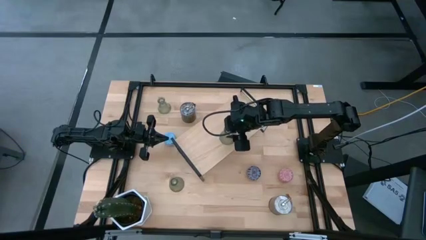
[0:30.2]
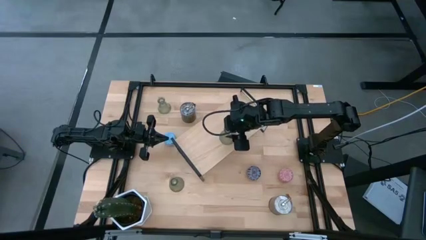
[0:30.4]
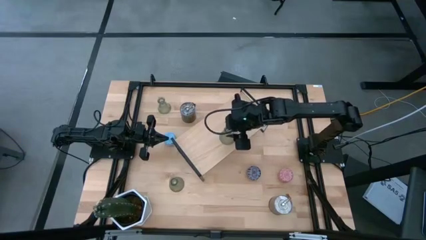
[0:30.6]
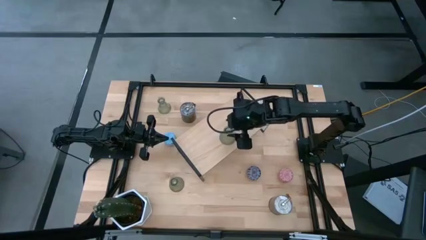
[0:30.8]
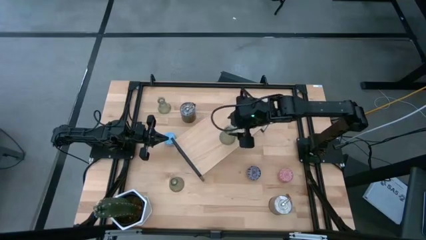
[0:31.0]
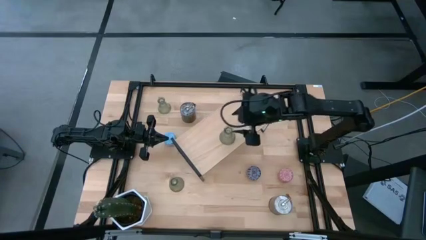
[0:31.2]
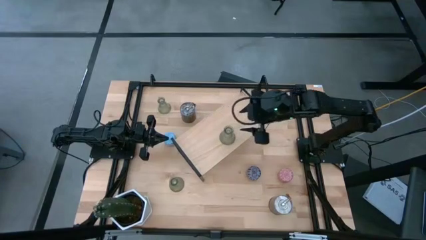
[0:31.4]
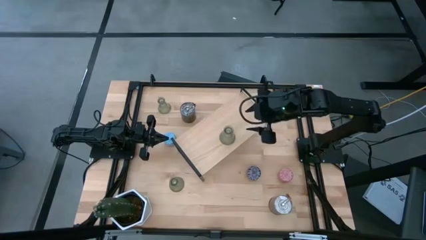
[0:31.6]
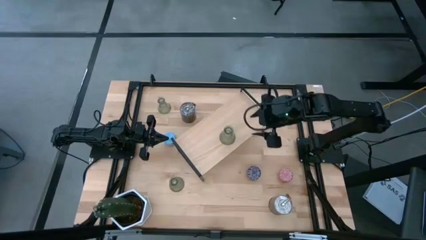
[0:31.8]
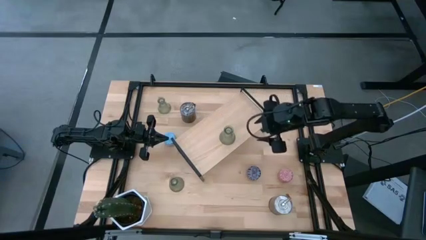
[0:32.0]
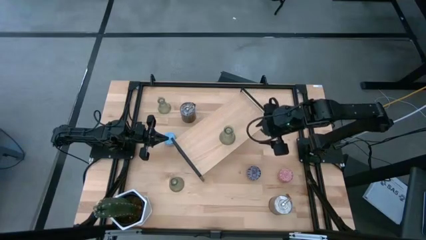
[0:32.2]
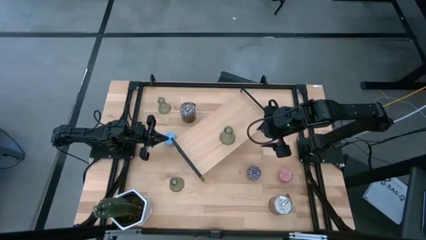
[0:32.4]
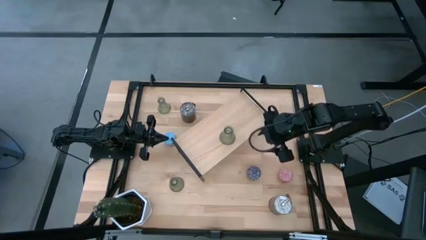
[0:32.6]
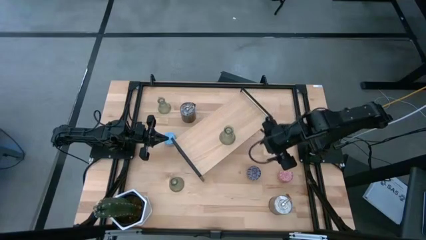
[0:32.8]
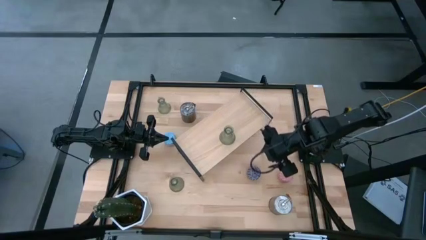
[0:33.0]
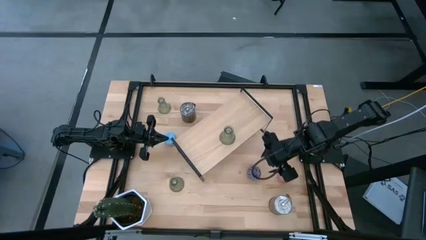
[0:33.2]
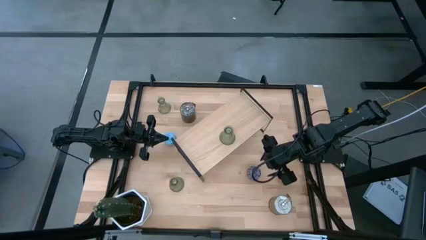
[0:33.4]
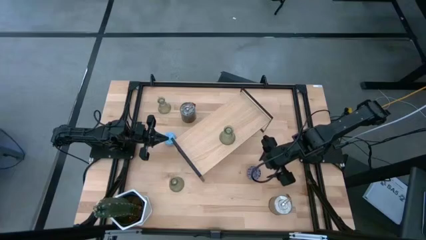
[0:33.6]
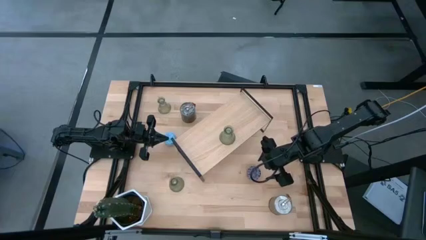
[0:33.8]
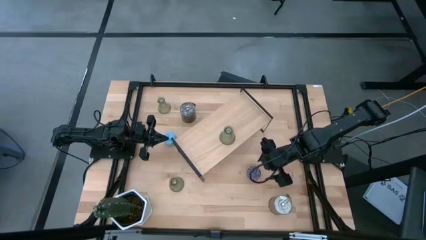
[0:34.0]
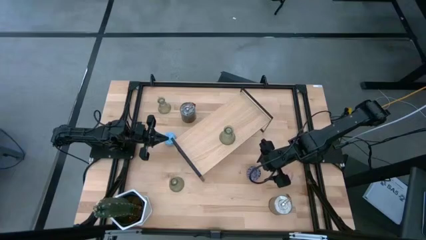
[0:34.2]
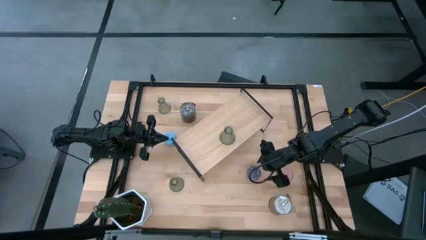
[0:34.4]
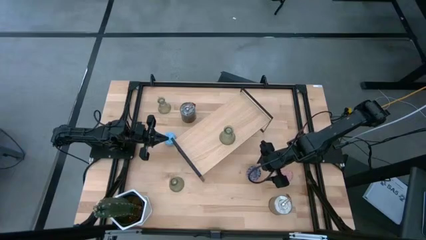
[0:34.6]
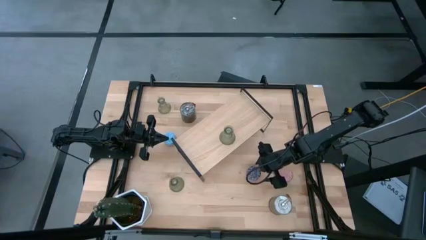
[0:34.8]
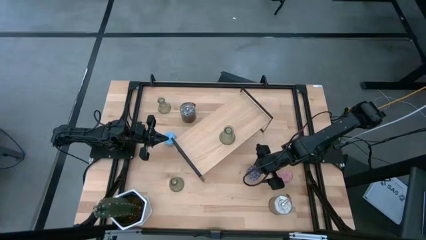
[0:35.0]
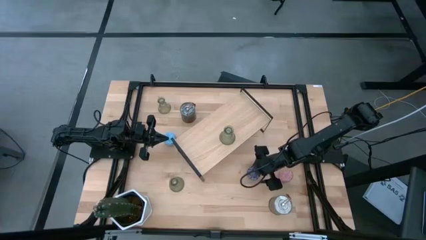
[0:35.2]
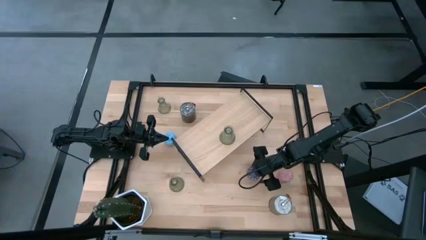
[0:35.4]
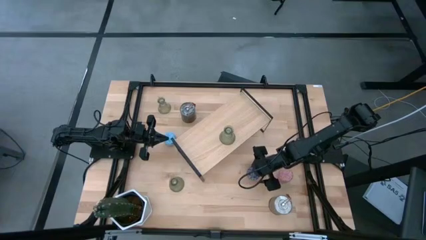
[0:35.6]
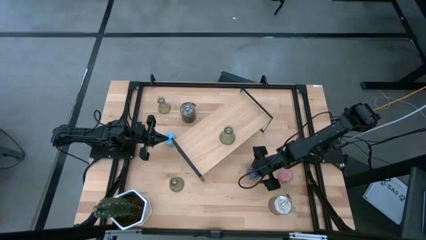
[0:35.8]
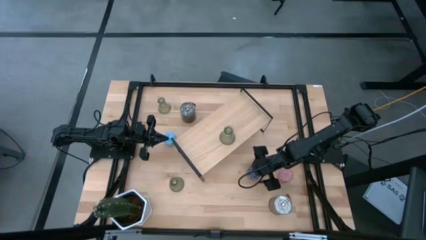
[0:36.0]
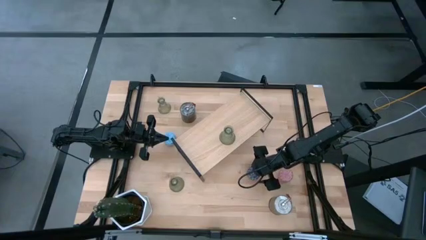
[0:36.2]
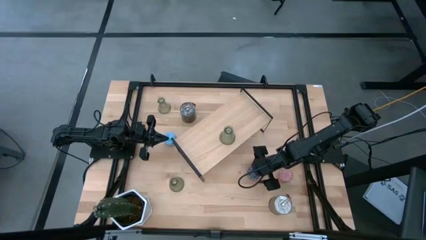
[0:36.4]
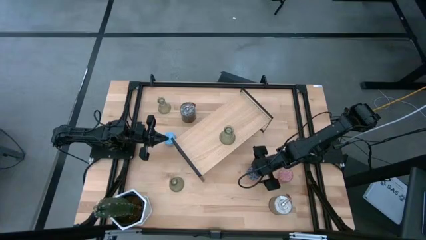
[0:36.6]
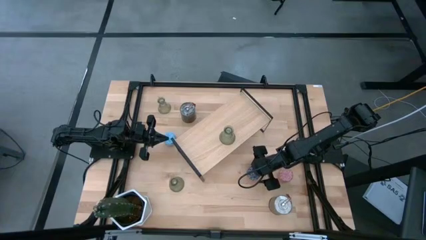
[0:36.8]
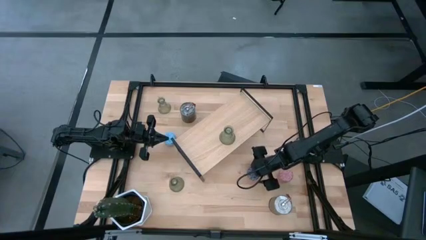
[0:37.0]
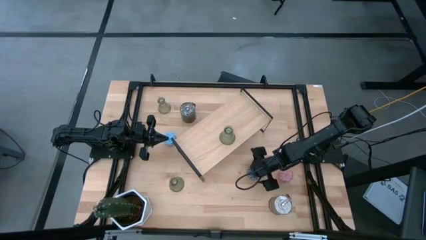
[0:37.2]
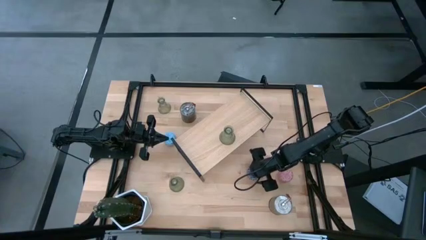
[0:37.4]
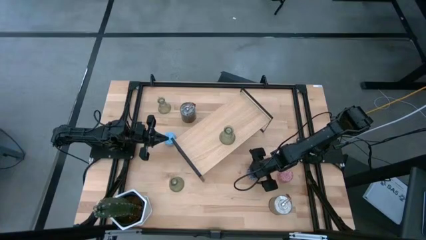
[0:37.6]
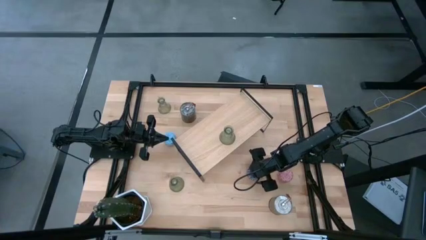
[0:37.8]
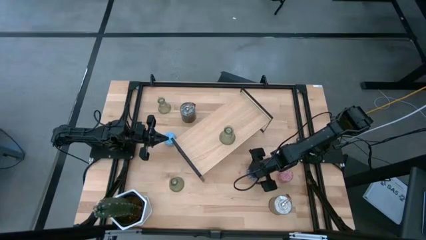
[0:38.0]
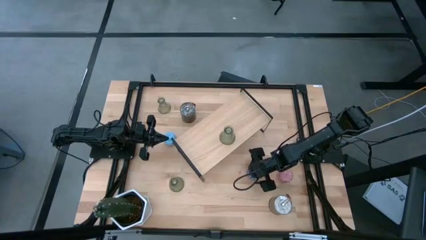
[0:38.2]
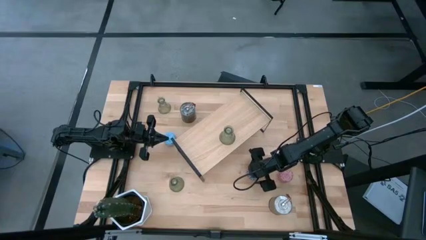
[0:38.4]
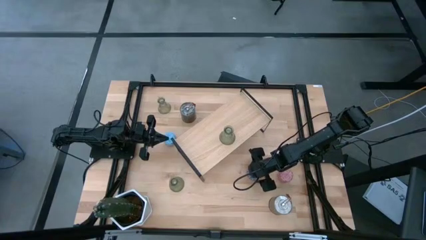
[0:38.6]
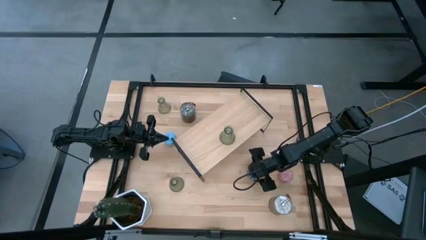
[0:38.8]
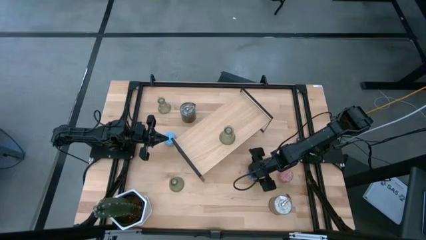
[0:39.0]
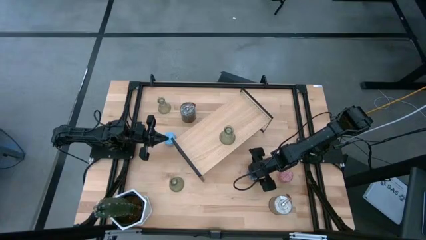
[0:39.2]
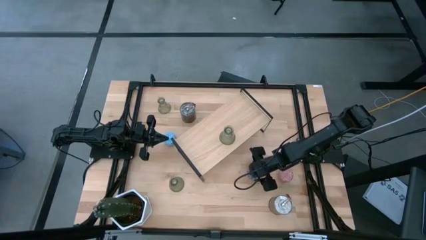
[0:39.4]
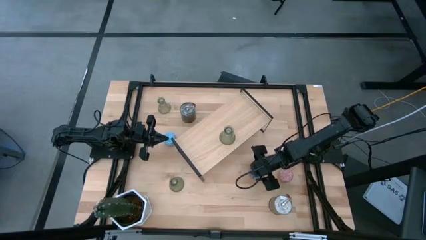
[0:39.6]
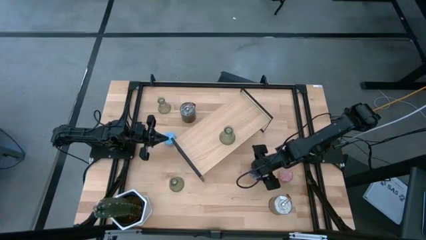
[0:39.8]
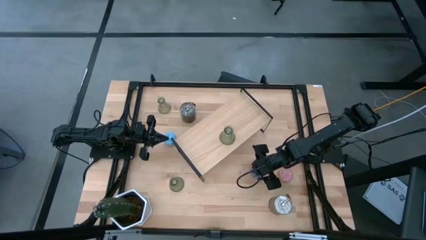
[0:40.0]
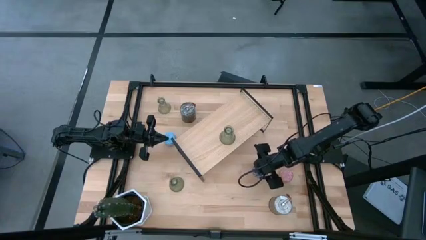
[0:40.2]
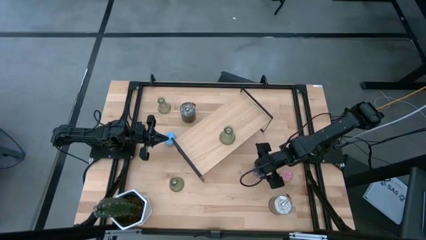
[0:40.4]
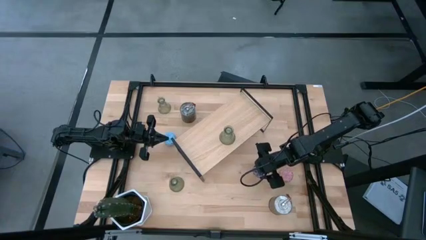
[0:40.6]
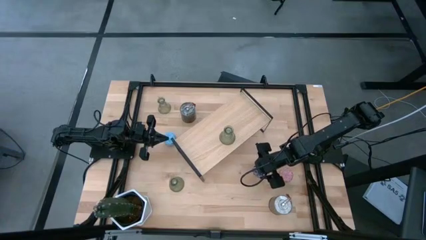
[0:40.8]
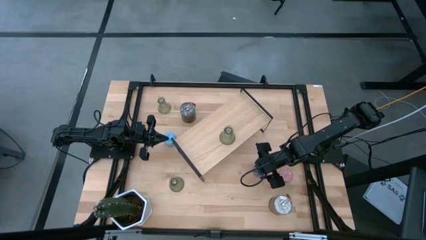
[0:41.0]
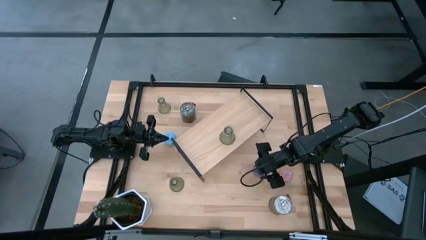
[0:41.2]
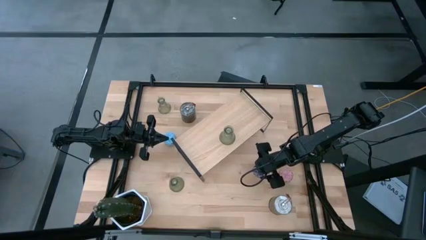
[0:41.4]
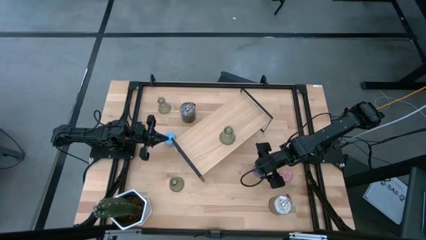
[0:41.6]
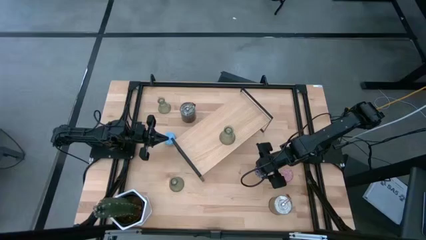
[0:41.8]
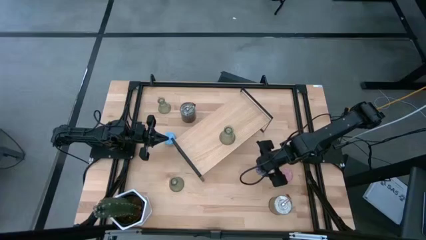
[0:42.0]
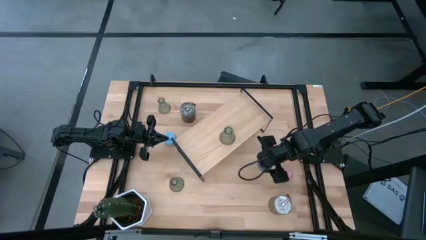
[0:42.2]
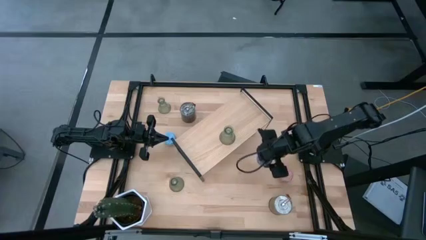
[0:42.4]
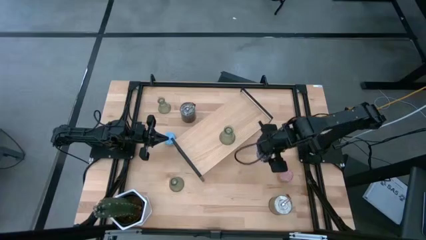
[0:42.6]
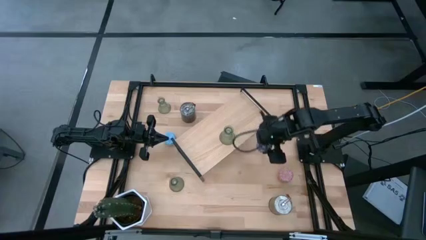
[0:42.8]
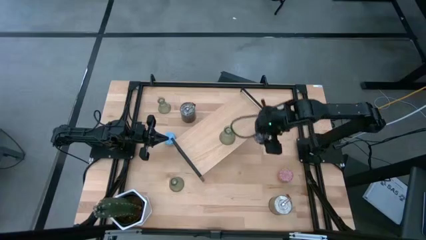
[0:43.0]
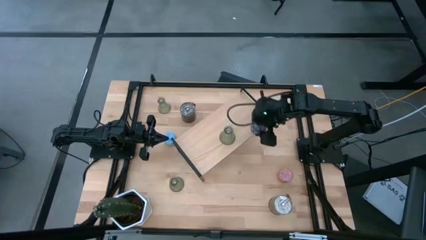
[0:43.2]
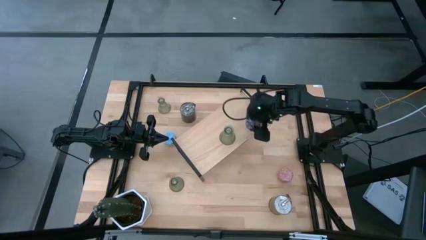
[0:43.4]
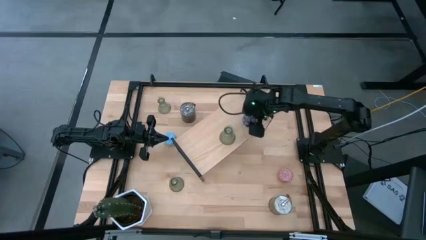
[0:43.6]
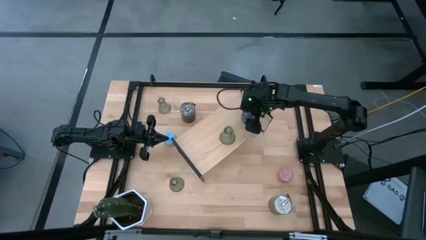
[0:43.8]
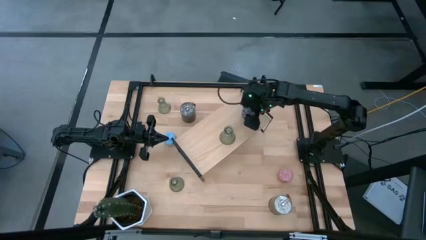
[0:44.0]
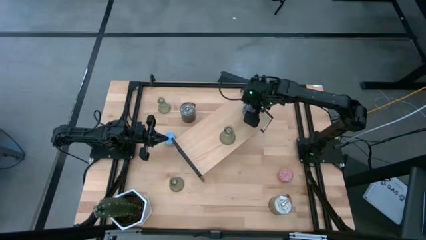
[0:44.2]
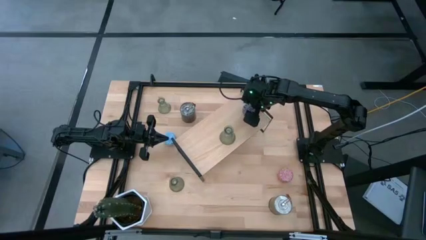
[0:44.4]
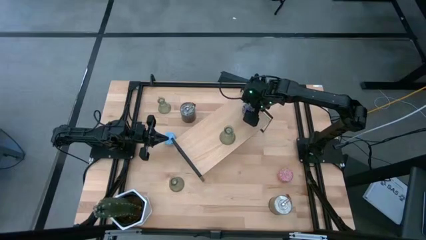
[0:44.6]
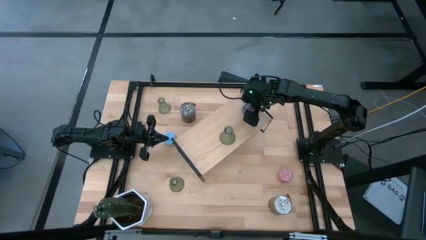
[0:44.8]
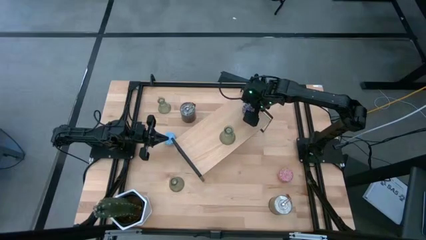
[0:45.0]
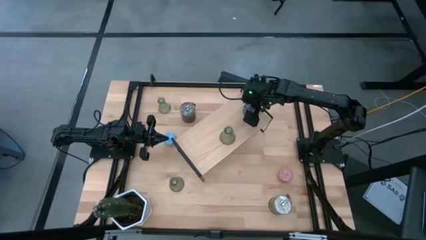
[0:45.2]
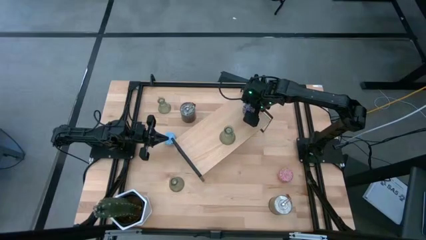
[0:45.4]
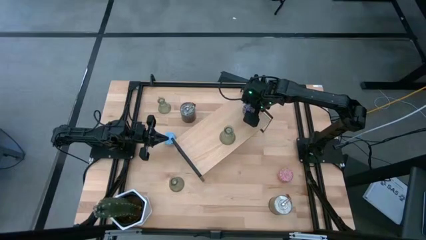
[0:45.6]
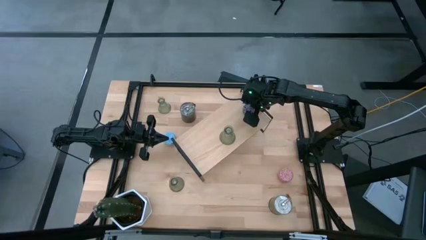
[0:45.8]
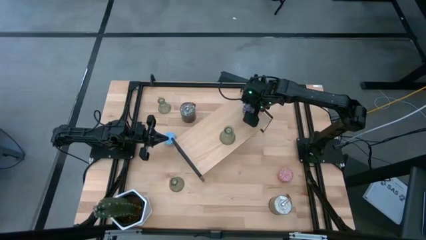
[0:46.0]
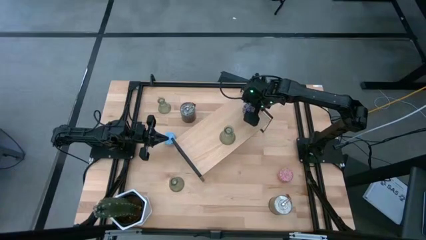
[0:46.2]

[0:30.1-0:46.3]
Task: Pick & Place candle stick holders
Put the black patterned scented candle on the shelf
